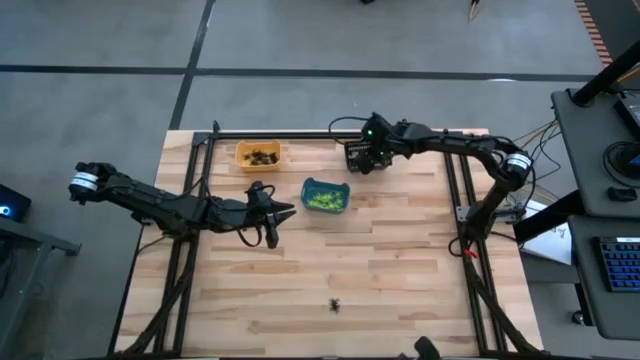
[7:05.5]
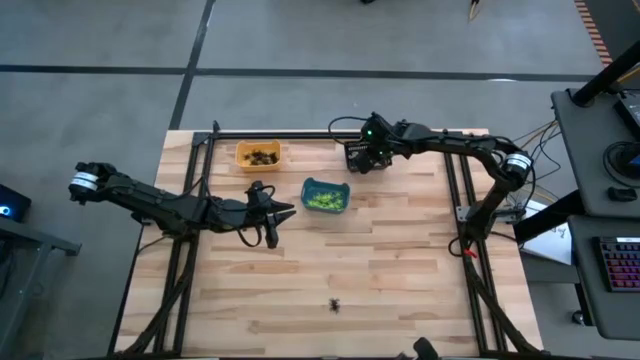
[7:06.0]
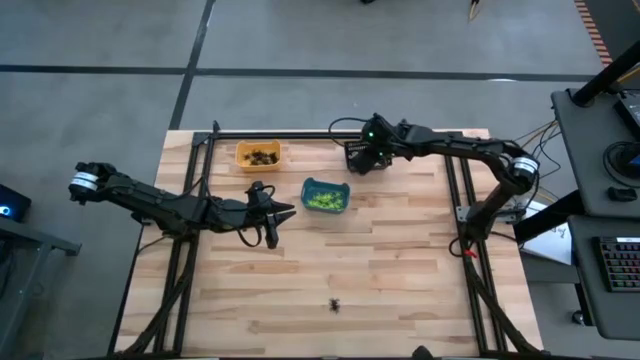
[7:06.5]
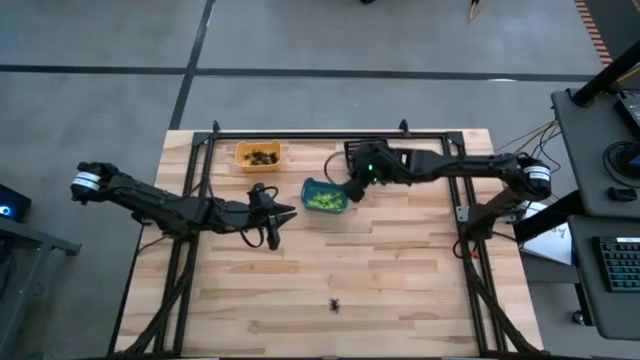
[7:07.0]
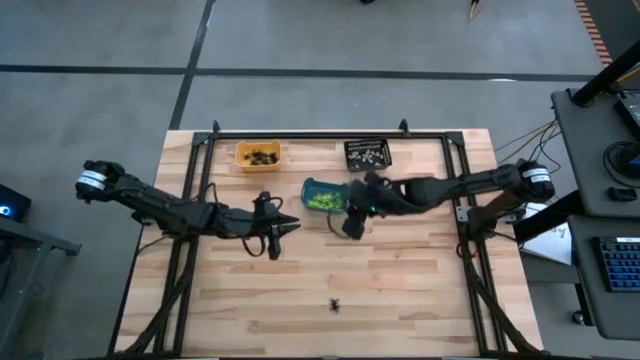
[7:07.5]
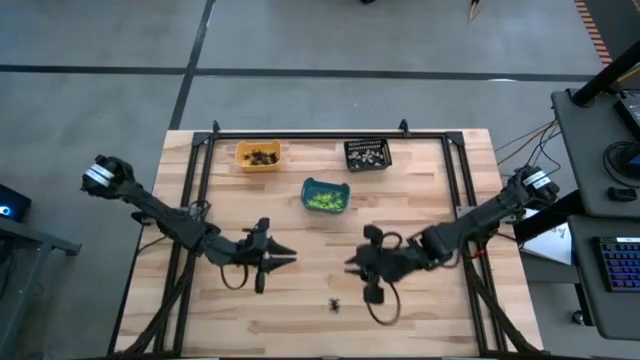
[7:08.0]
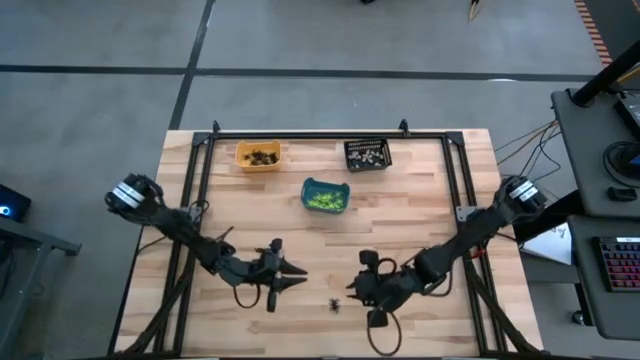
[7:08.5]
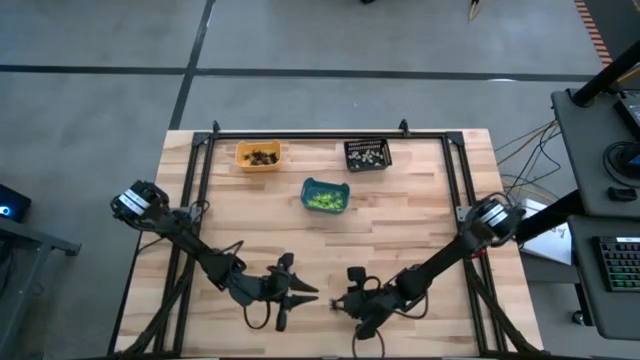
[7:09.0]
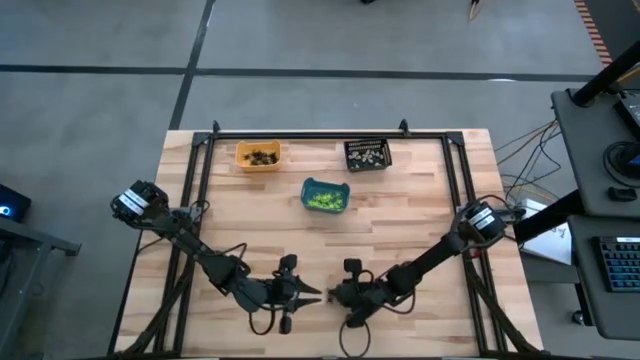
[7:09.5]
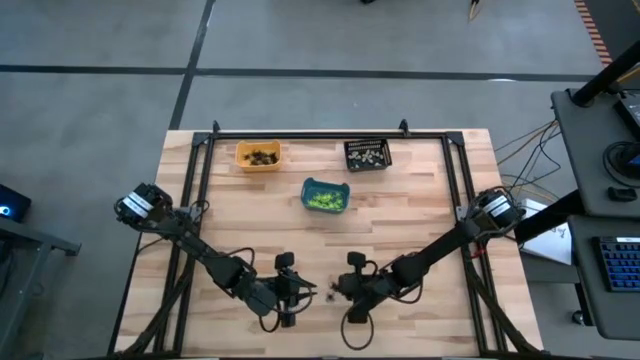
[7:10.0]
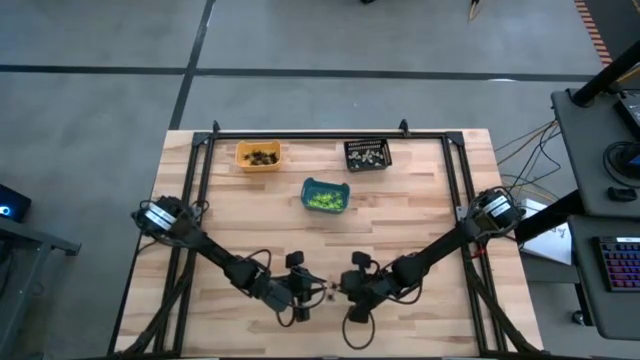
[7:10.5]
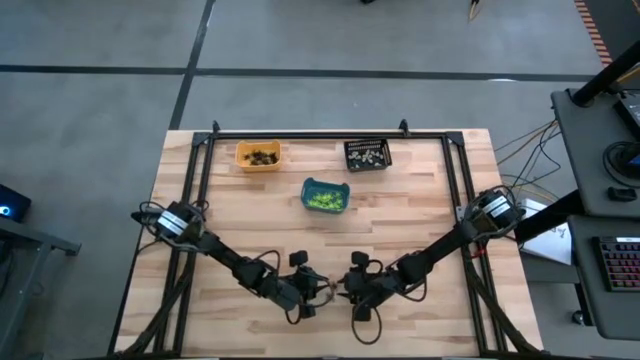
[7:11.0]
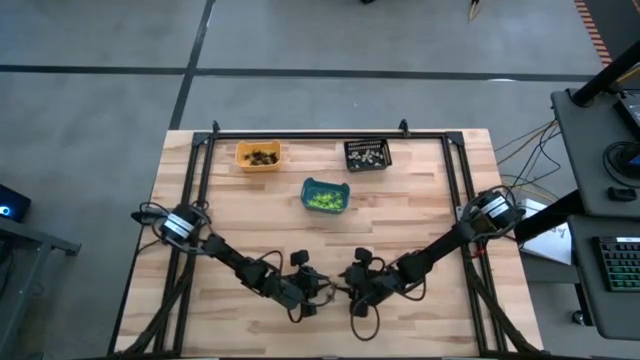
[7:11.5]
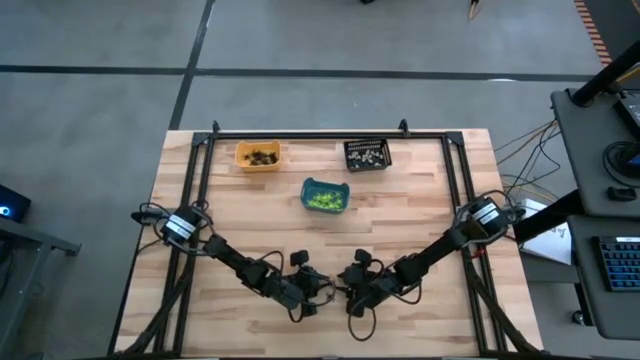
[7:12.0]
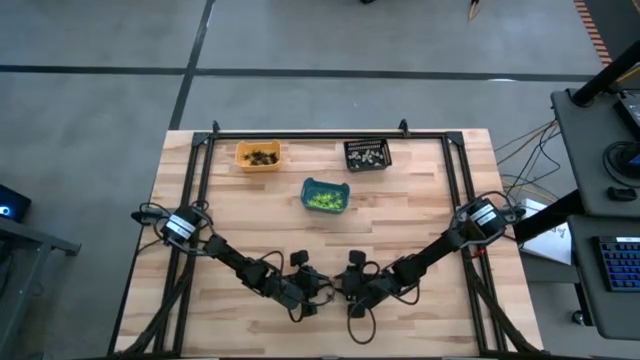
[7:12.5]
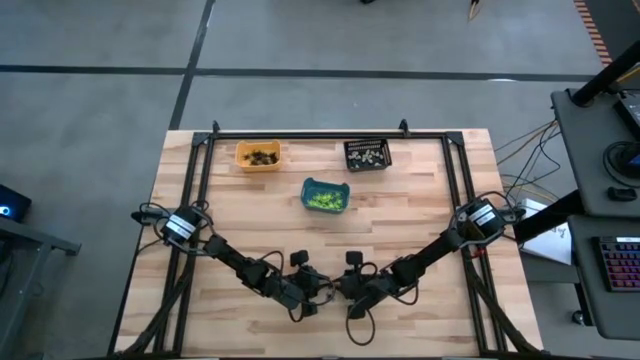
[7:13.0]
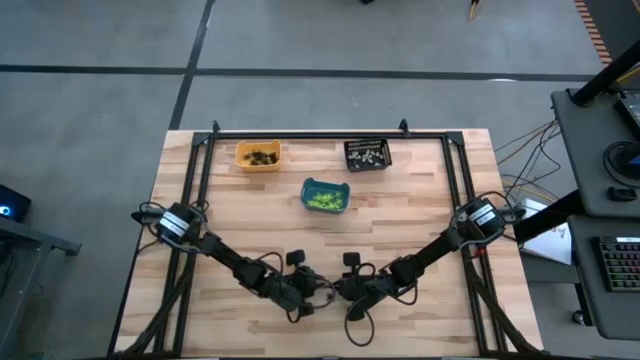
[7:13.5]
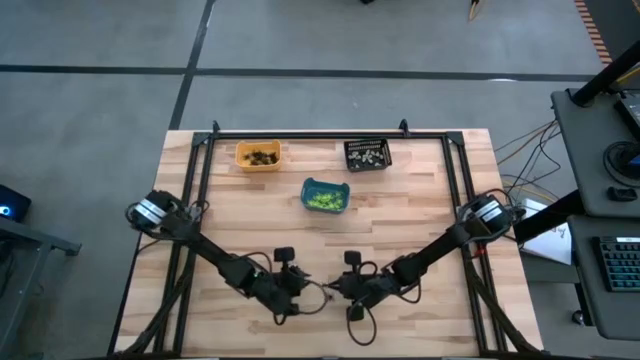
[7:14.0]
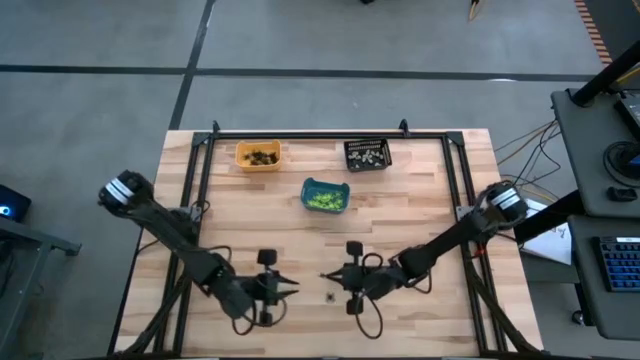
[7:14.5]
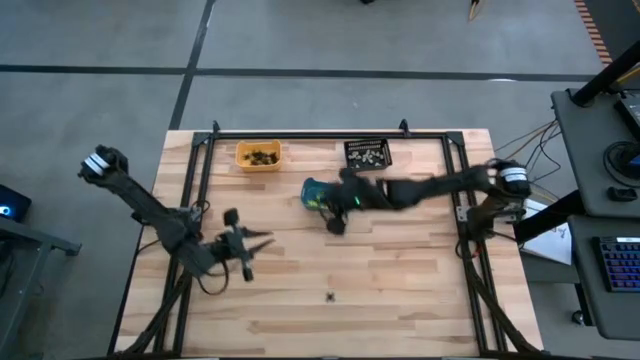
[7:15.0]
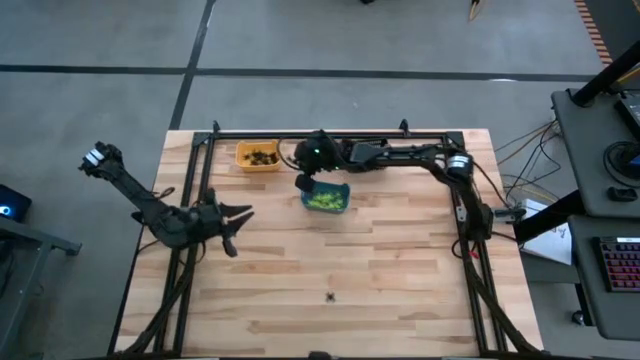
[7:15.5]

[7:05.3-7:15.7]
Task: Sort Halloween decoration
Put the black spider toy into the yellow bin

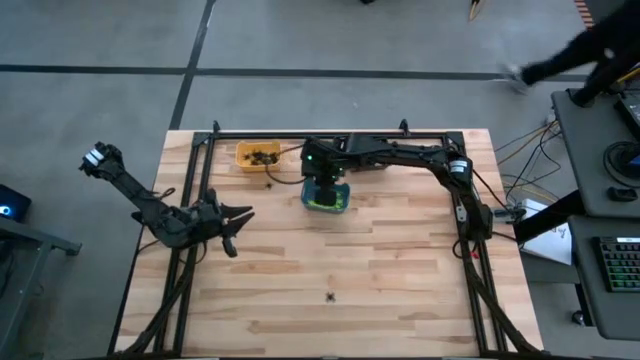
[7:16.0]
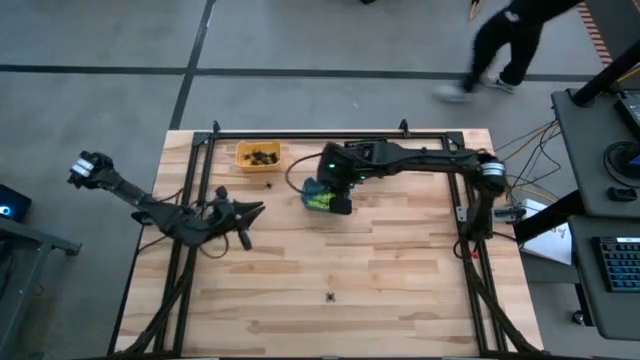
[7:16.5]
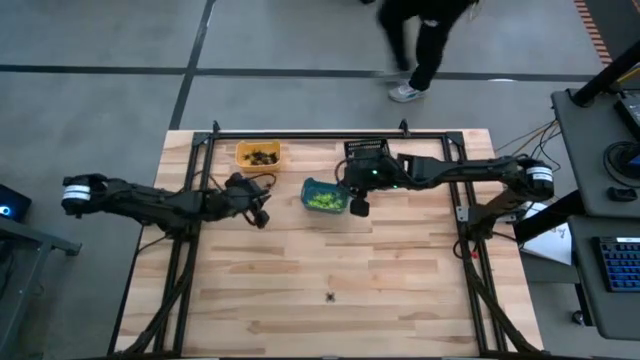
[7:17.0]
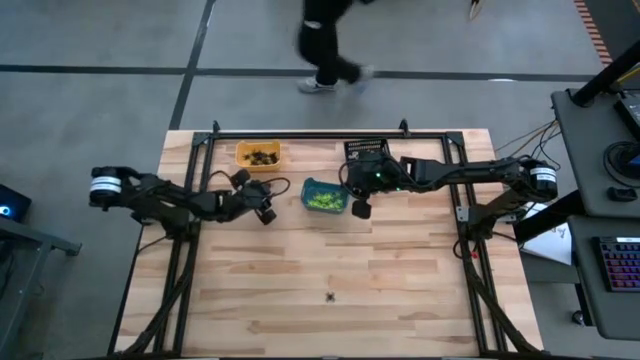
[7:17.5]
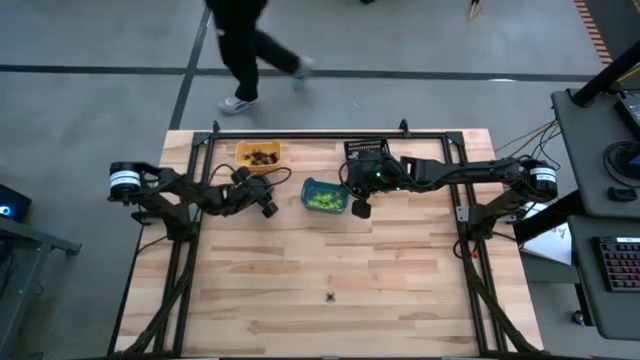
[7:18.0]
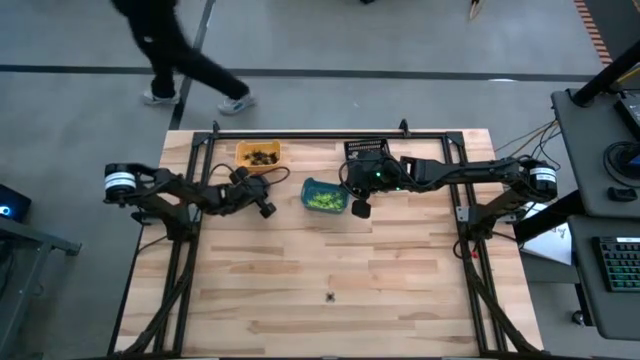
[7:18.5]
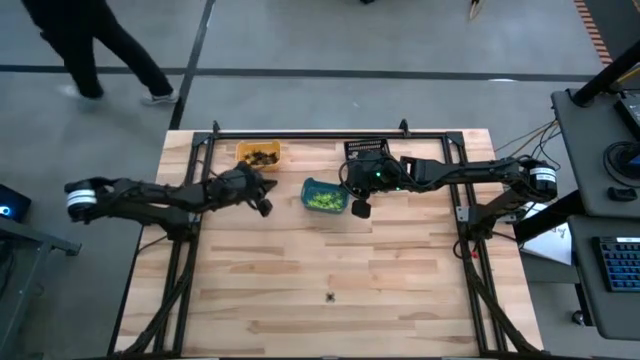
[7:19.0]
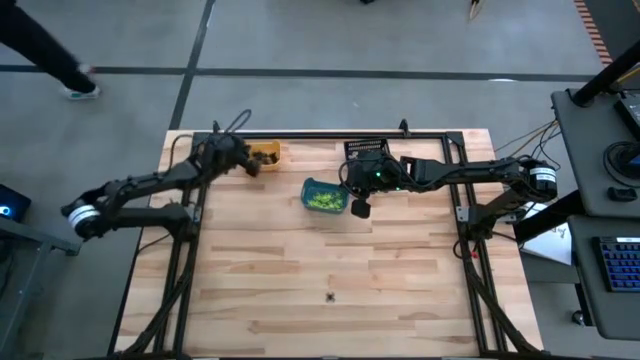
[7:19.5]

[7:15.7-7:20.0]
Put the black spider toy into the yellow bin

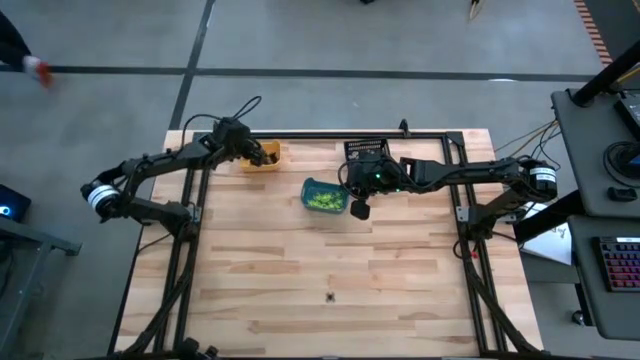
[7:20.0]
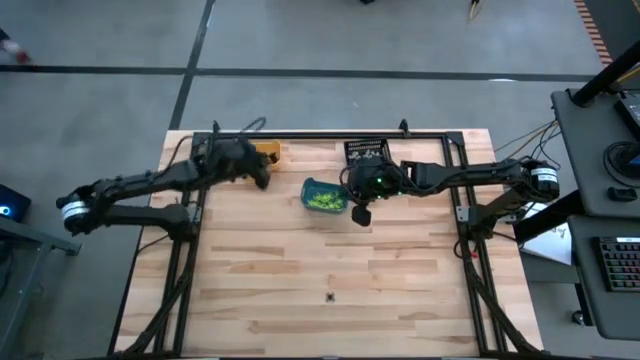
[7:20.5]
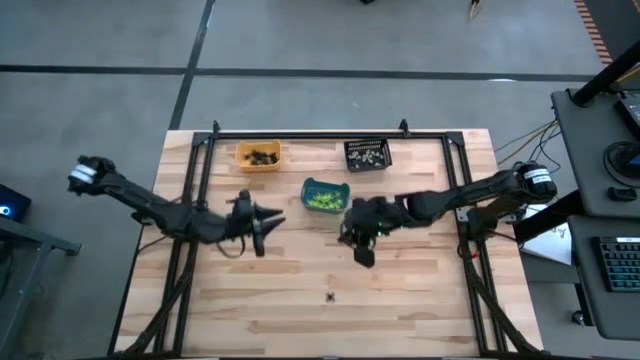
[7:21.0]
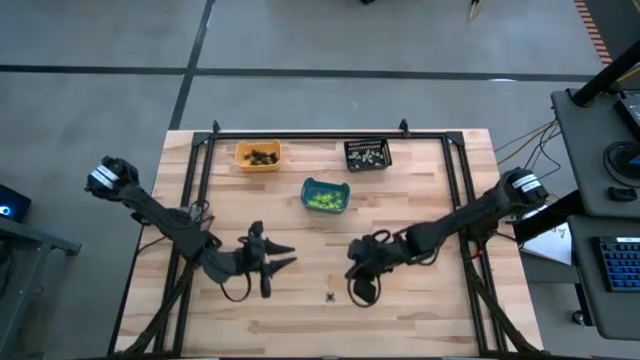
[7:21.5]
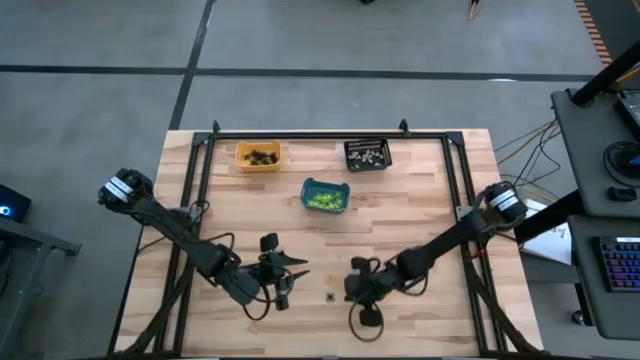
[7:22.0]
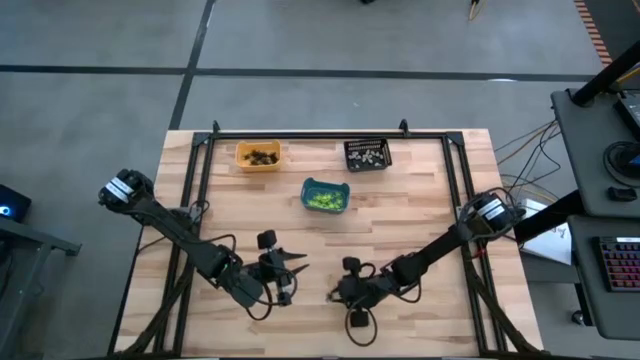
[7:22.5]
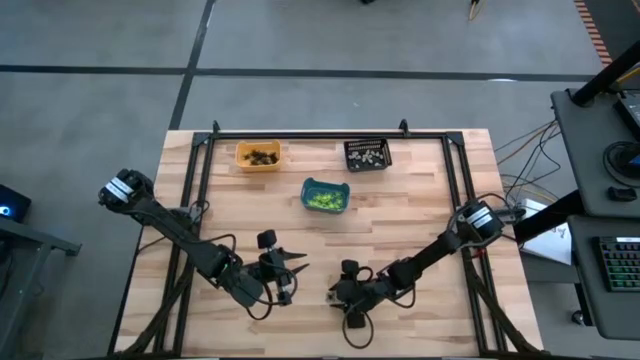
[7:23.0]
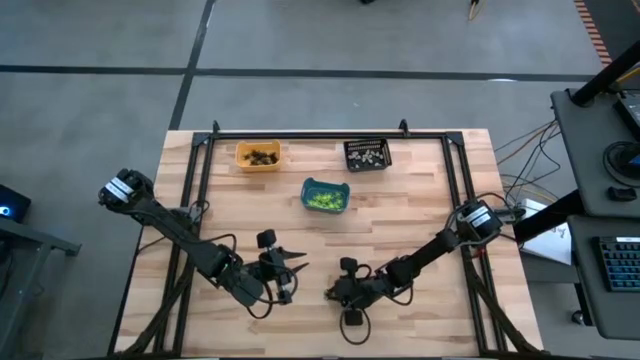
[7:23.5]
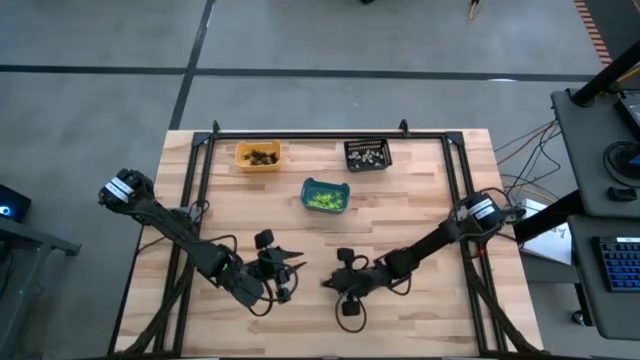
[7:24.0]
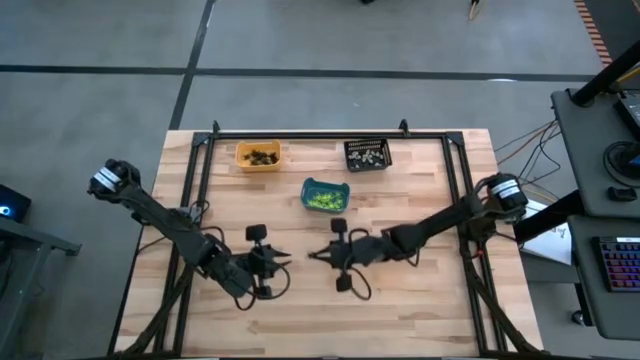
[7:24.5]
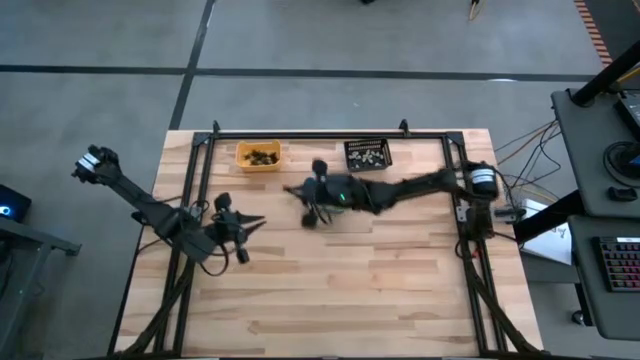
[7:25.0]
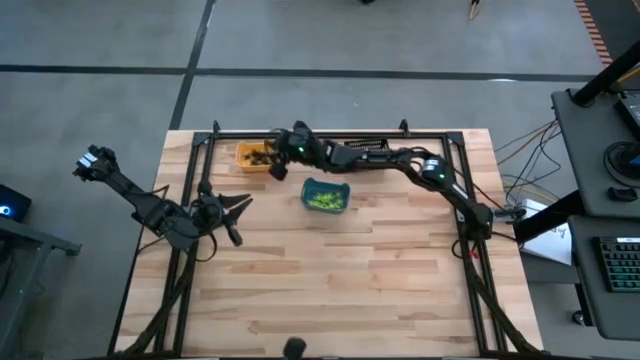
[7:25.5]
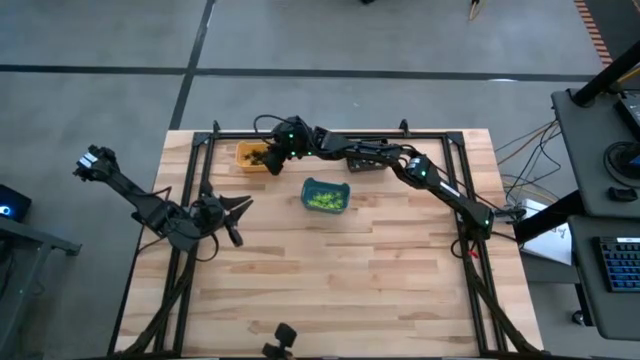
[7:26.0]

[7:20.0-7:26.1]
Put the black spider toy into the yellow bin
